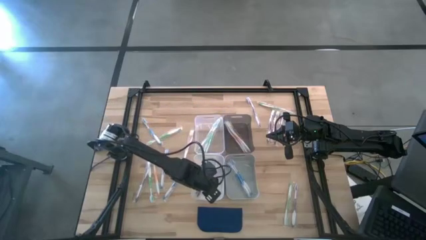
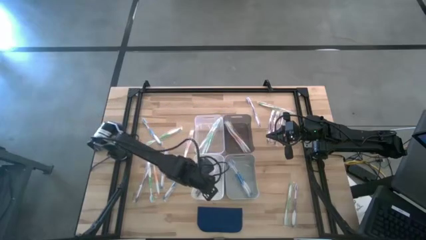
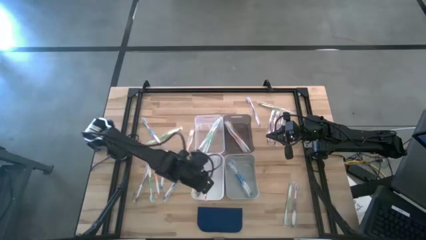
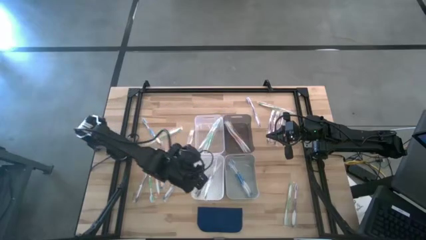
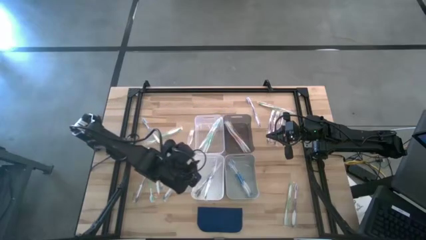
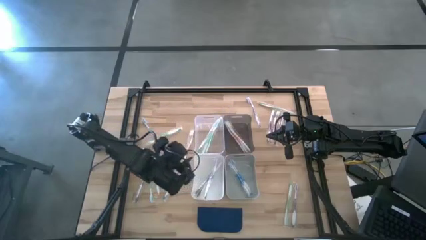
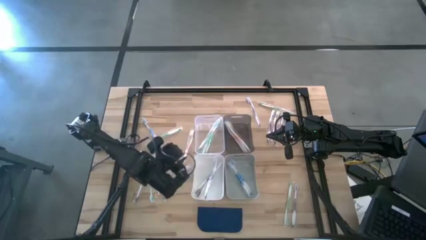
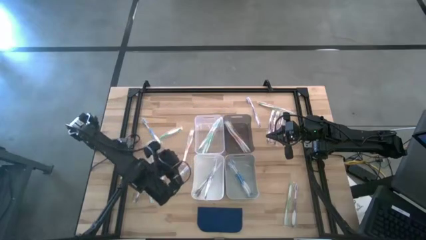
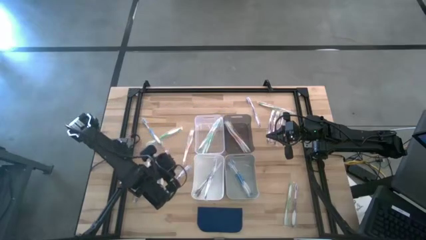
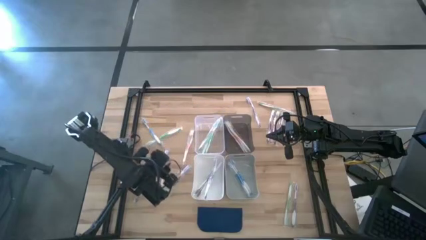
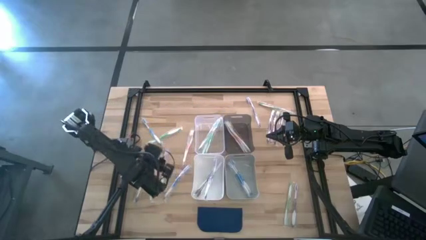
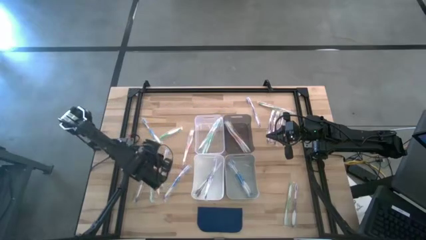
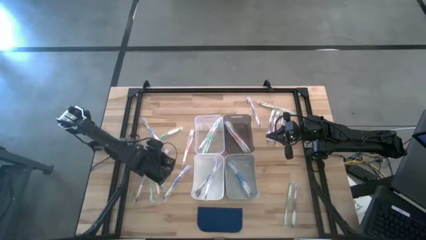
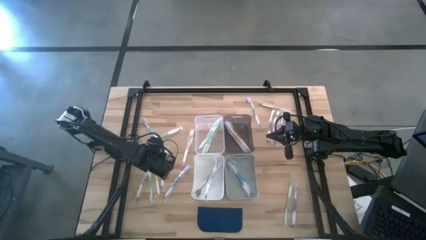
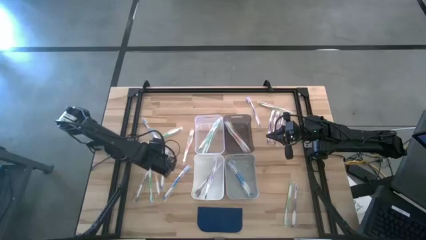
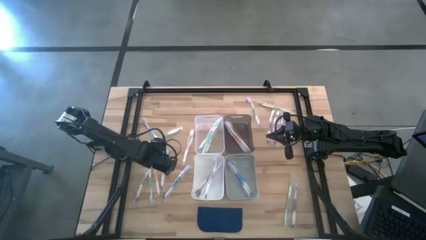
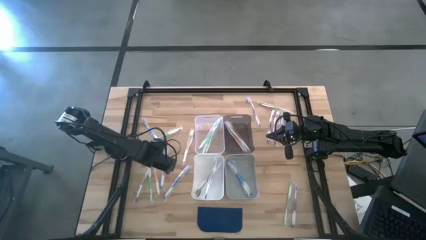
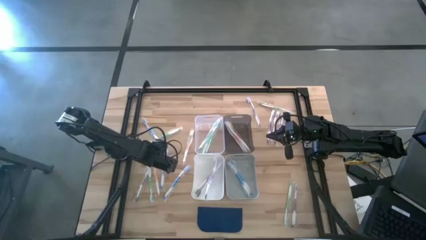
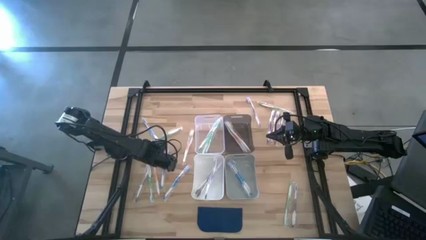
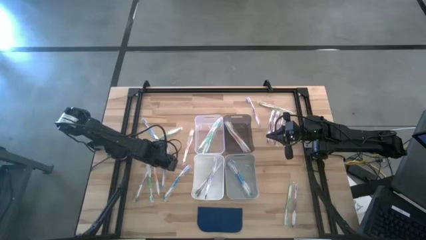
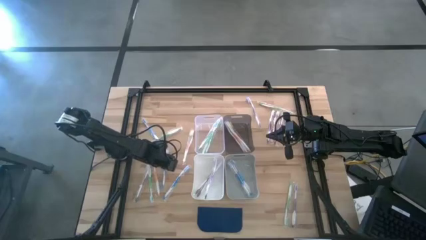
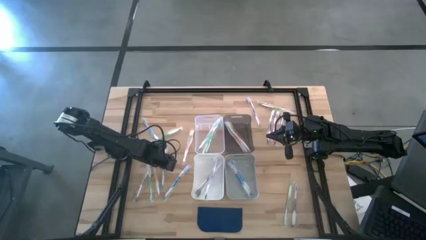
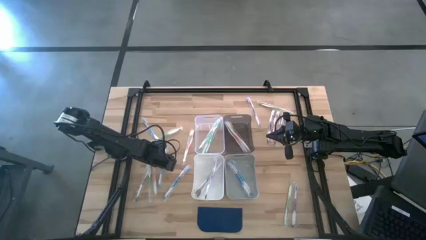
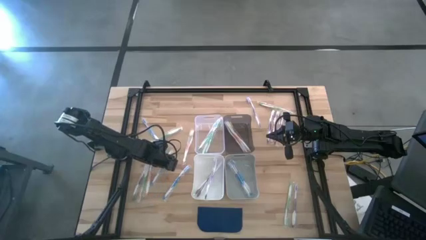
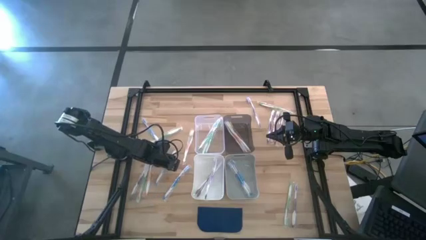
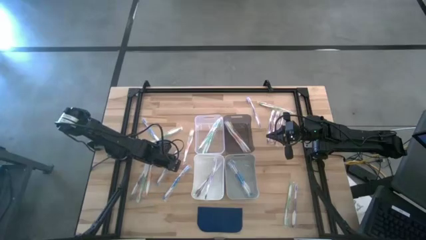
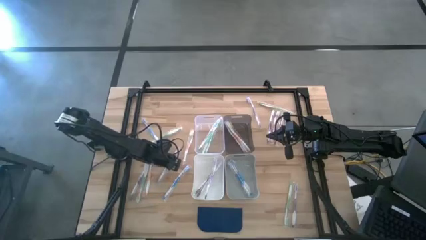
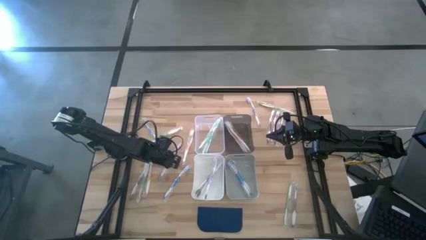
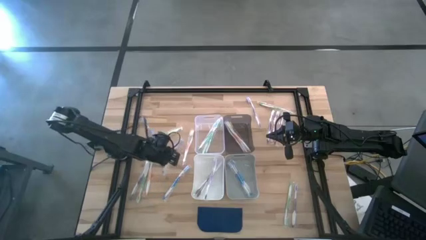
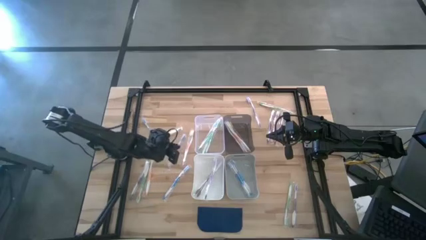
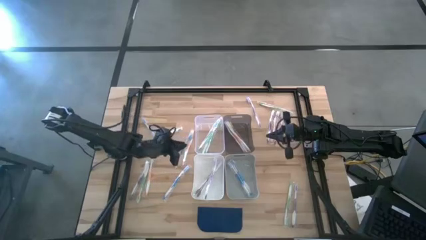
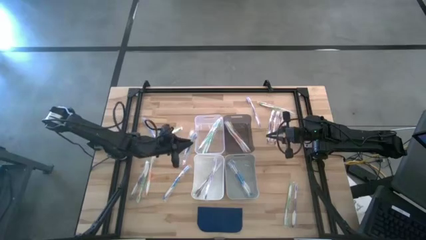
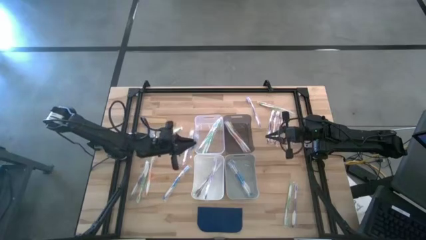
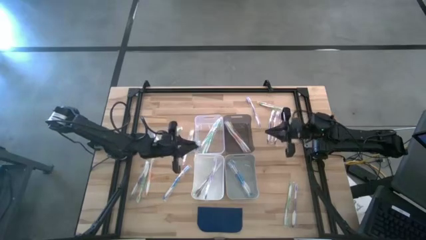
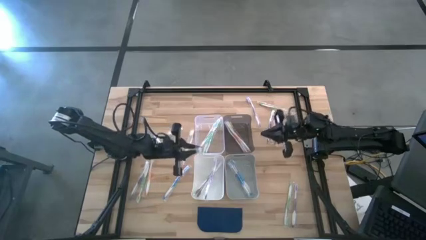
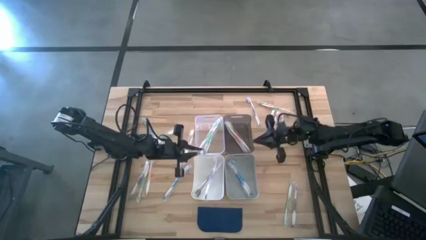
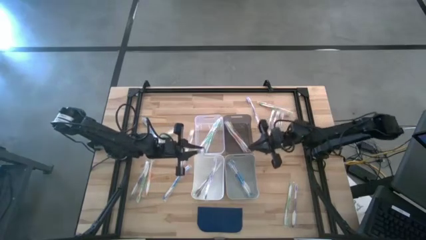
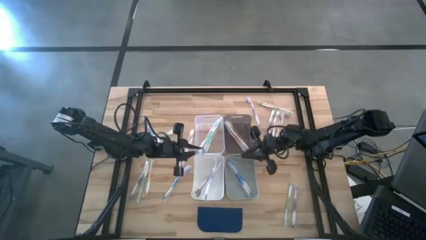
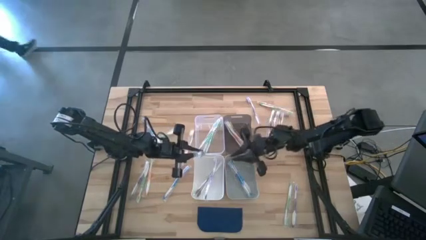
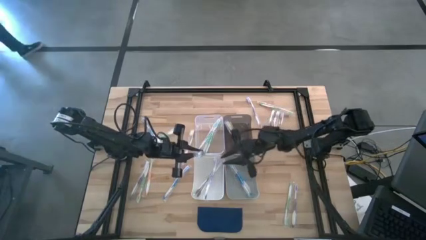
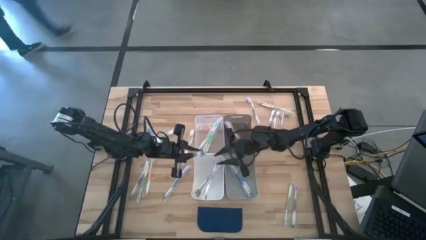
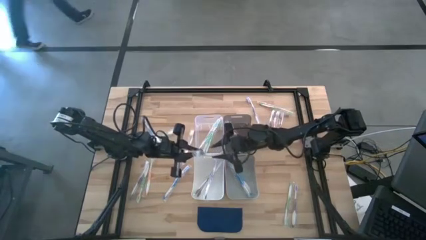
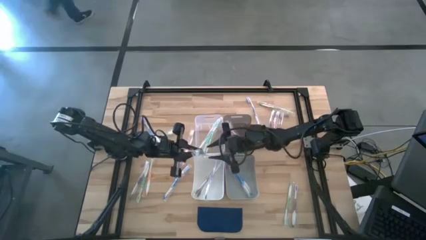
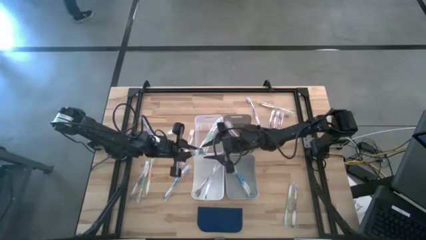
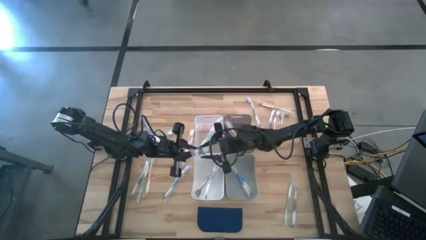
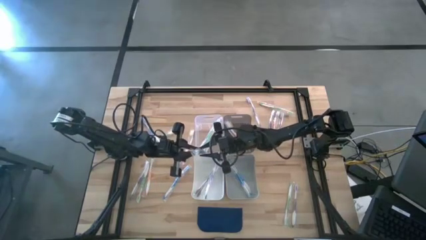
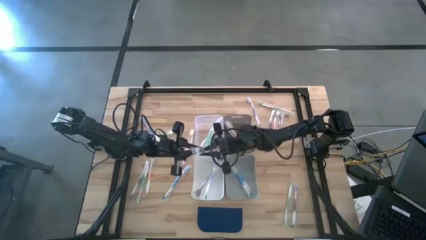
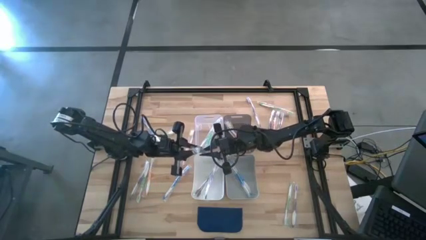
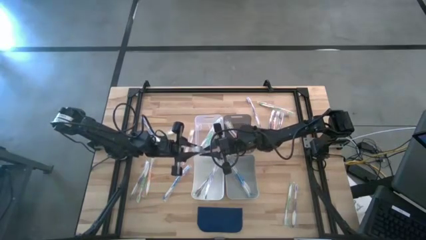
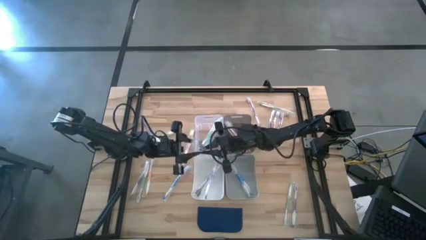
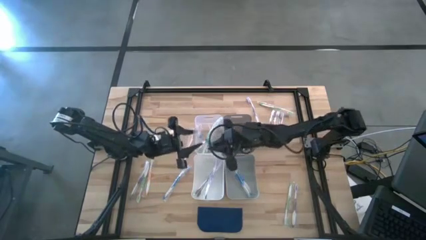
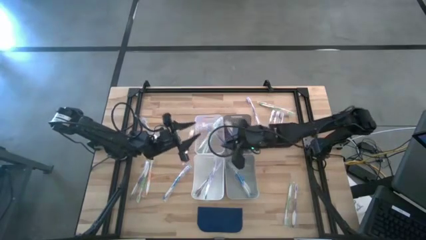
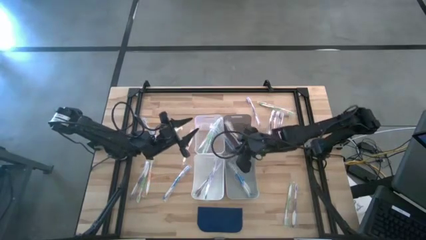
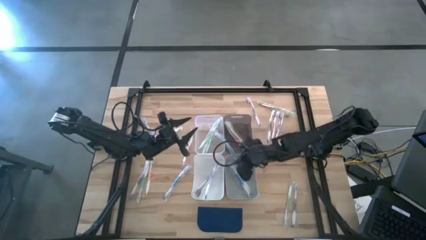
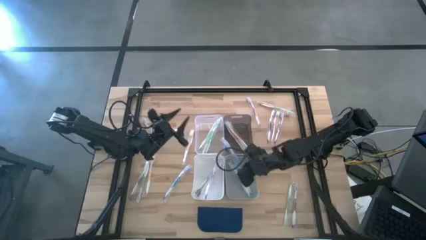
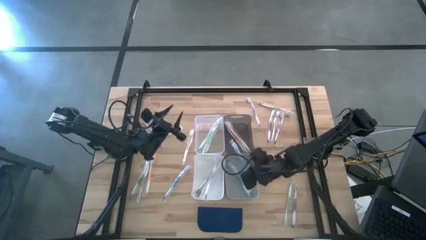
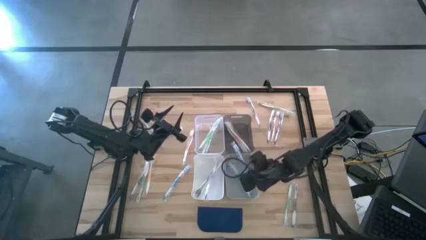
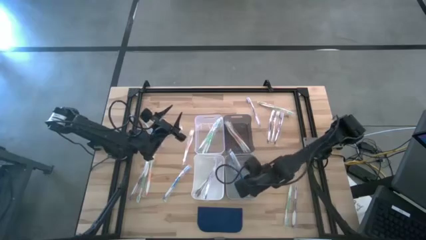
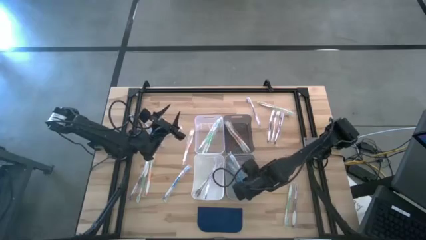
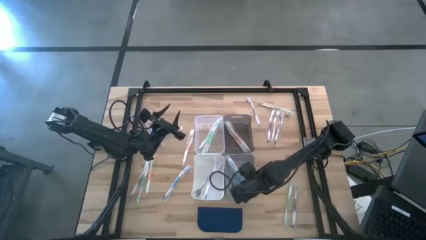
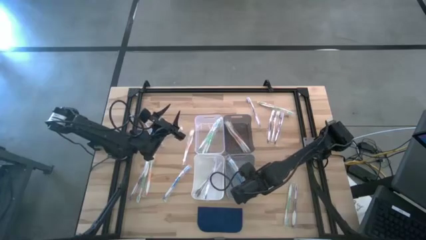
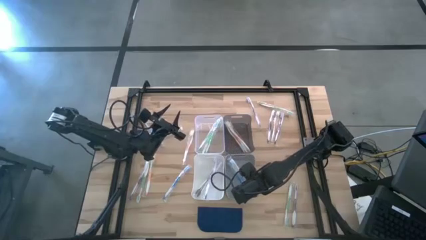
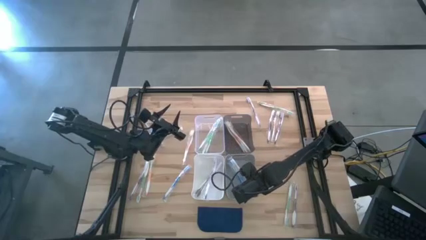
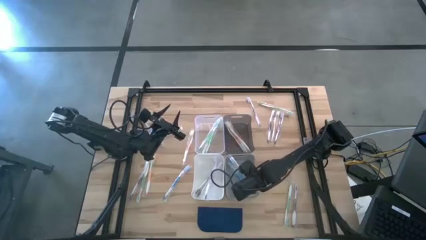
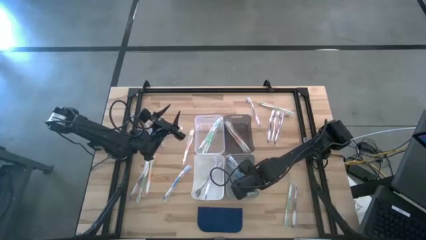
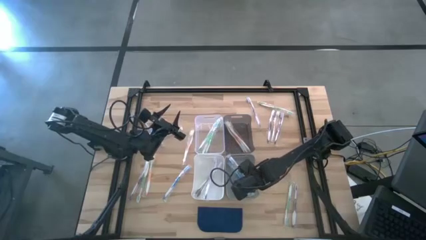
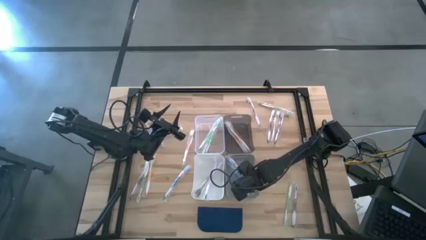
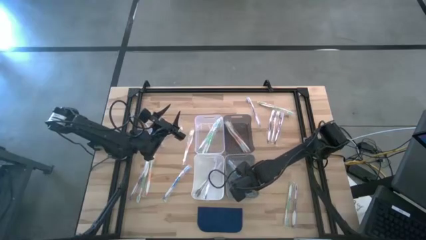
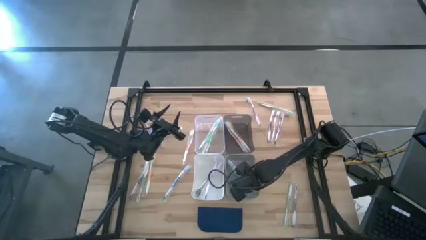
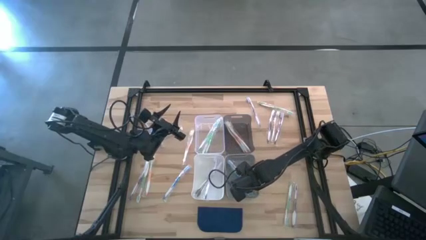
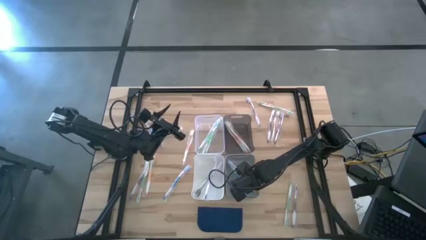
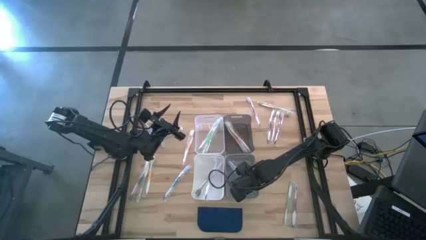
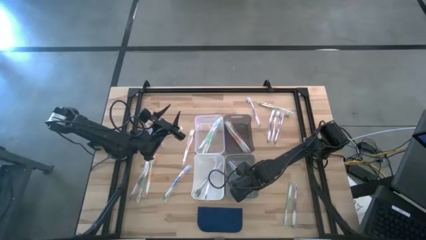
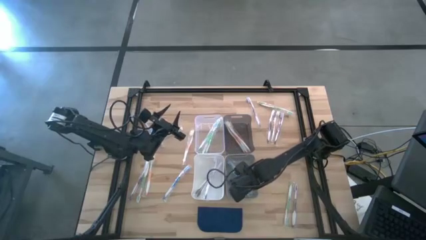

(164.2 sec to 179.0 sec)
Task: Pick & Place Toothbrushes
Put the blue toothbrush into the gray bin

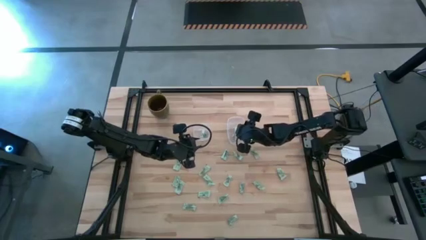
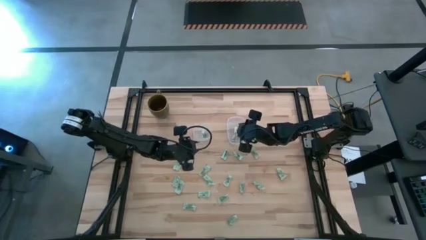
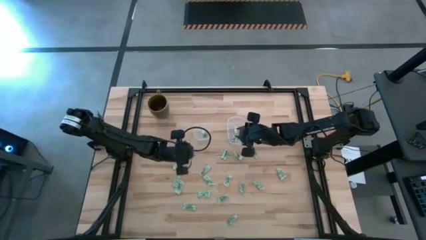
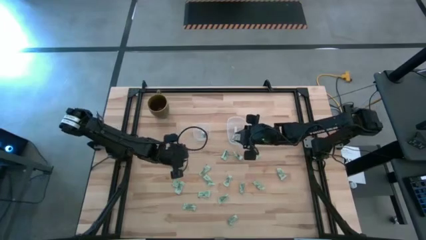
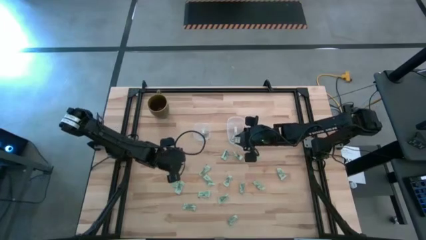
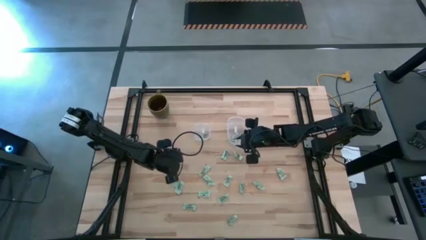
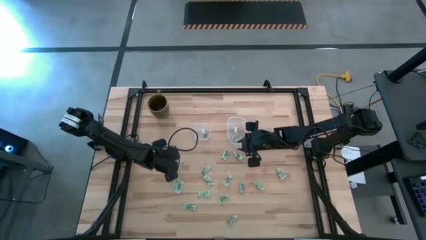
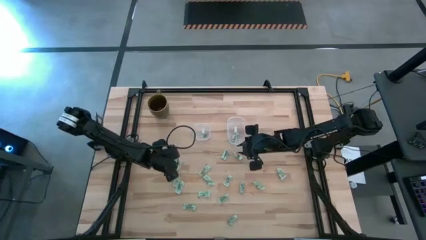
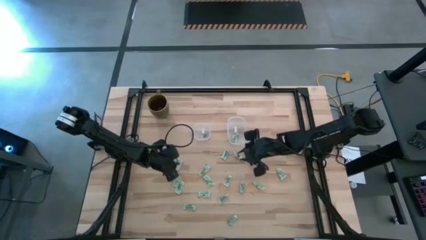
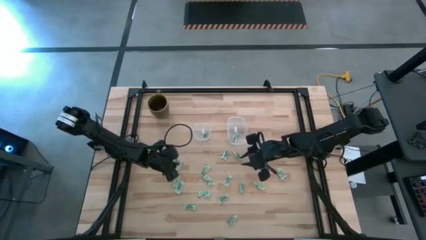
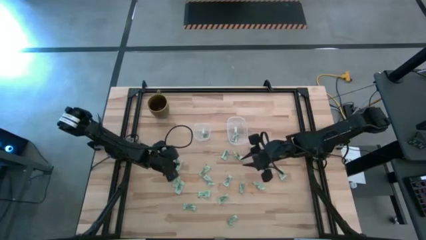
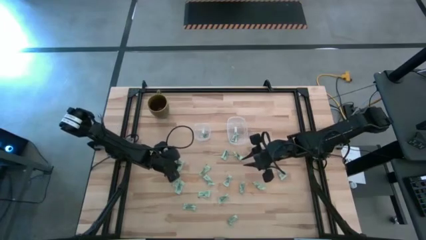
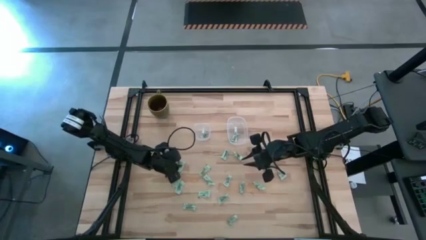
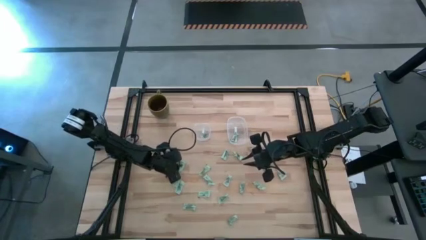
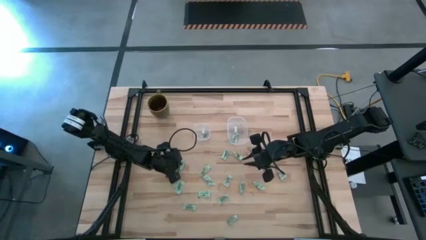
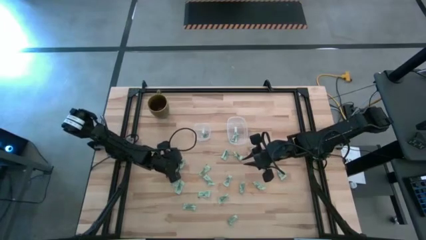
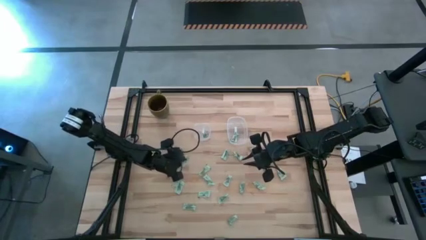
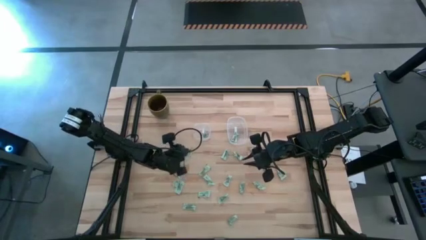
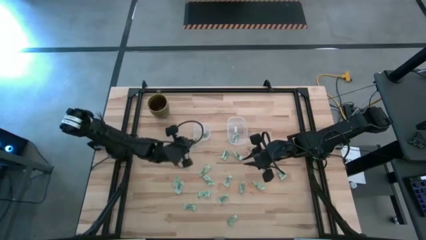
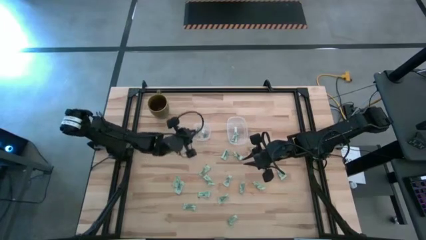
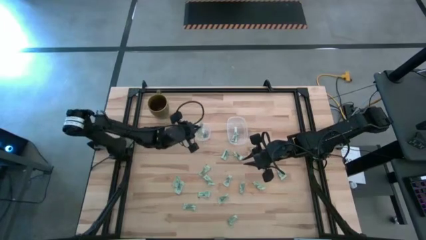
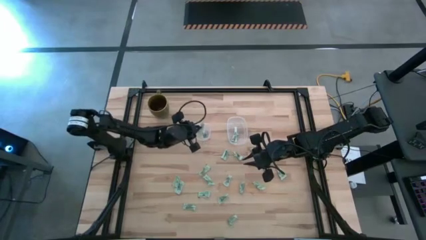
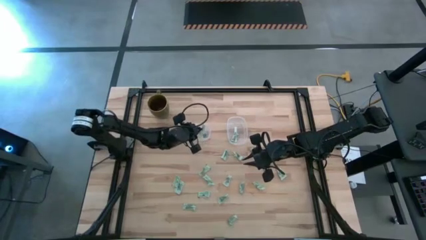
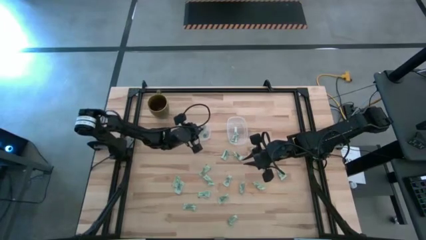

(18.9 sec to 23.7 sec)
Task: Pick and place items into bin
Put the light green stevia packet into the left transparent bin
